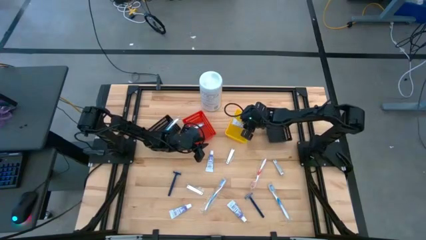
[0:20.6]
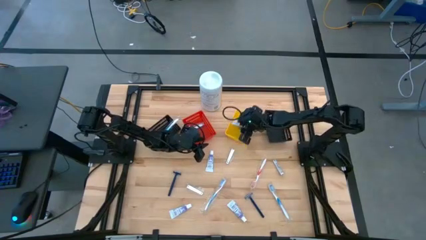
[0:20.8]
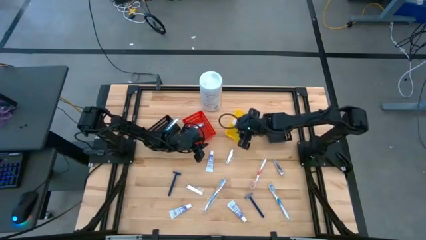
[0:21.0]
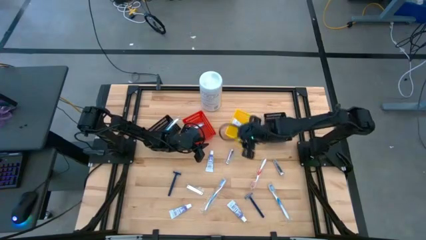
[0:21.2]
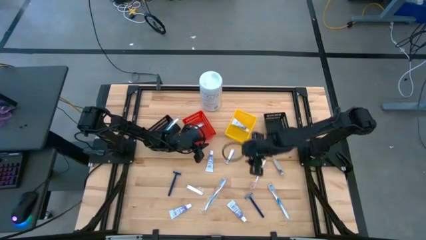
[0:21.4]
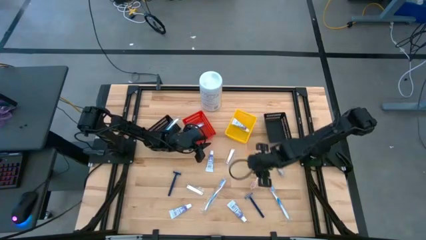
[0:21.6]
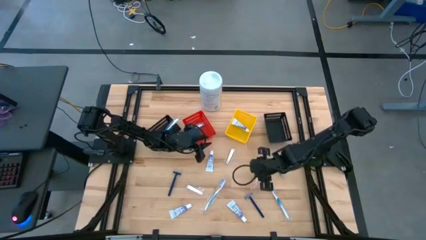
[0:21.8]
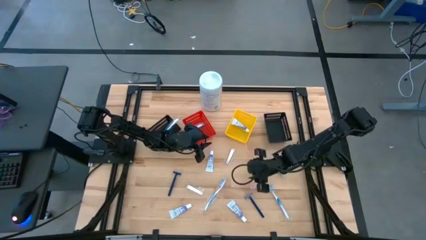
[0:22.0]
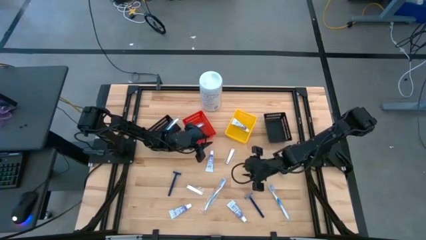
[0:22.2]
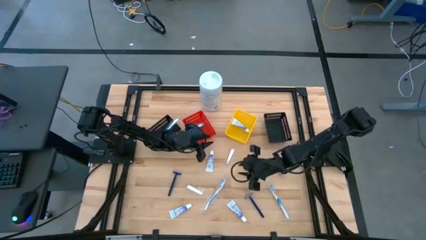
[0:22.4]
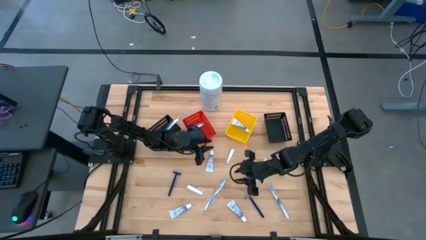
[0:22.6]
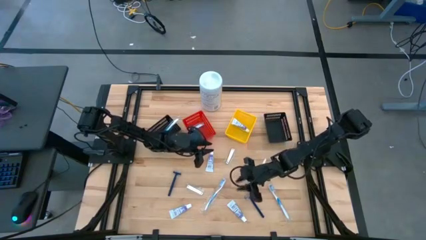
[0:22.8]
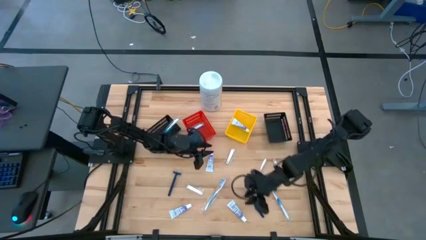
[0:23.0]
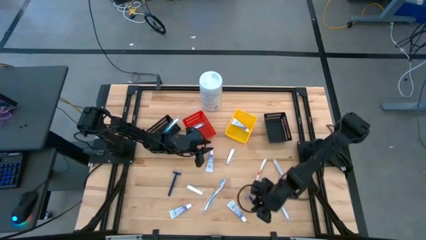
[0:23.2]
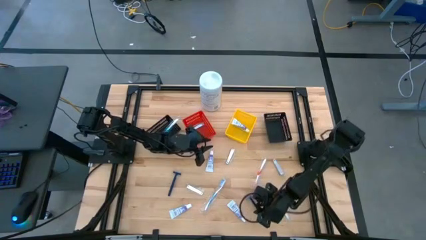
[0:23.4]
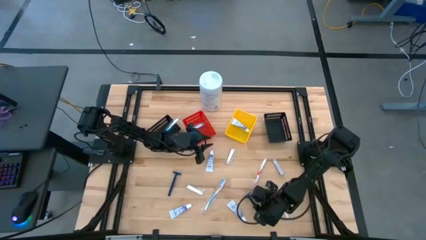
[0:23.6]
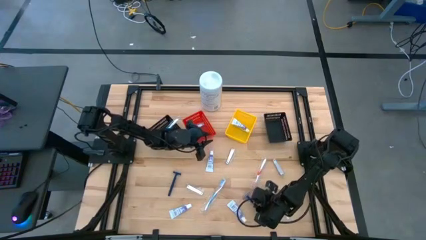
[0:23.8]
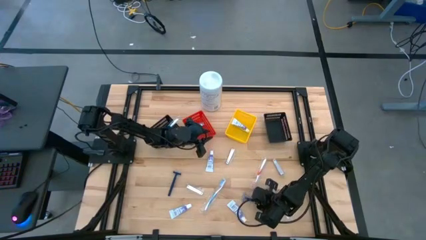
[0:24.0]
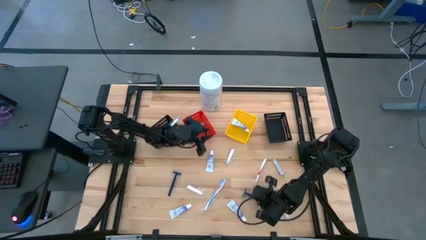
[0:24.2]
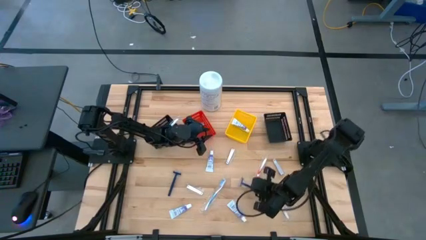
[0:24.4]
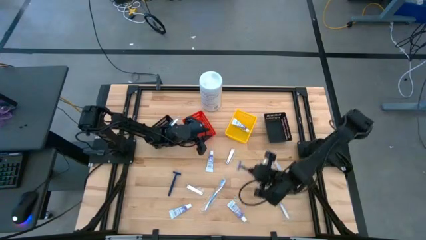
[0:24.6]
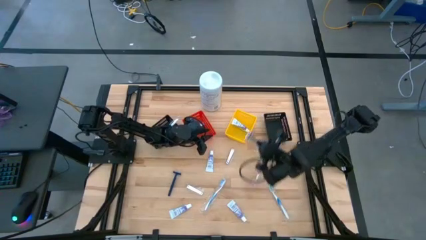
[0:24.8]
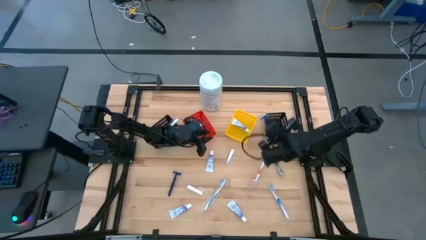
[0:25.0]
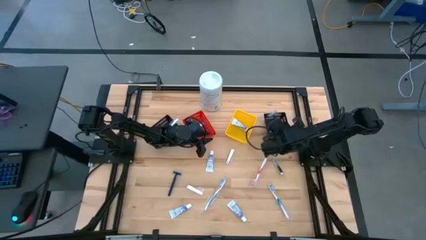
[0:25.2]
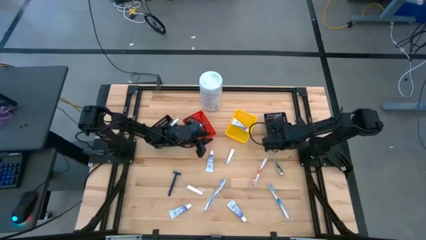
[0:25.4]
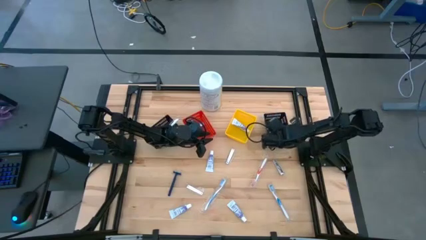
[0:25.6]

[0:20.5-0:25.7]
Task: Pick & Place Travel size toiletries
Put the right blue razor into the right black basket

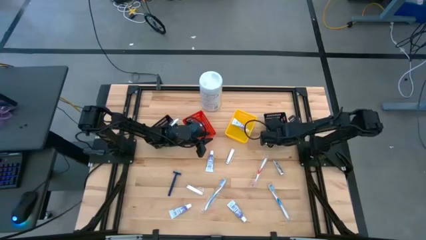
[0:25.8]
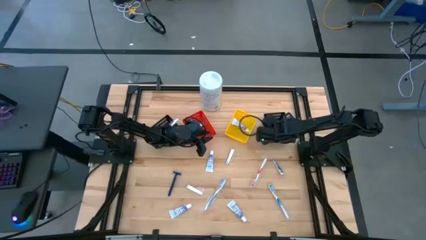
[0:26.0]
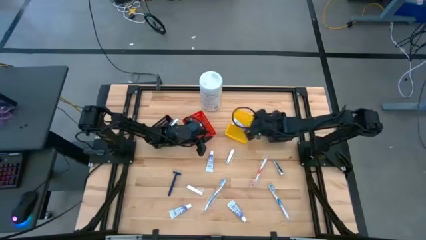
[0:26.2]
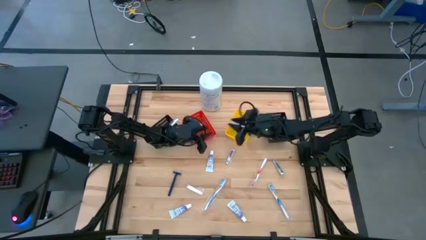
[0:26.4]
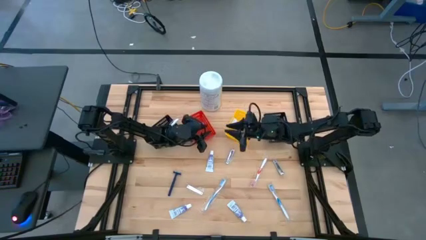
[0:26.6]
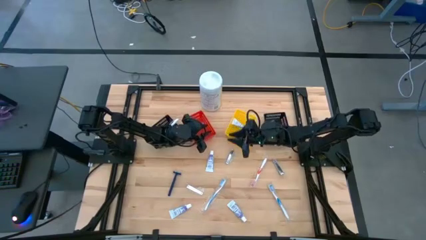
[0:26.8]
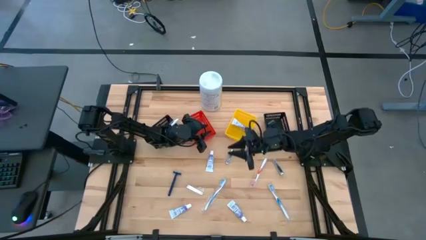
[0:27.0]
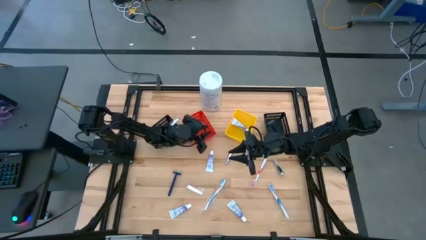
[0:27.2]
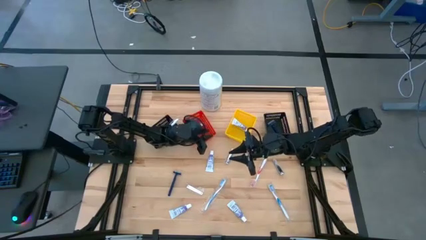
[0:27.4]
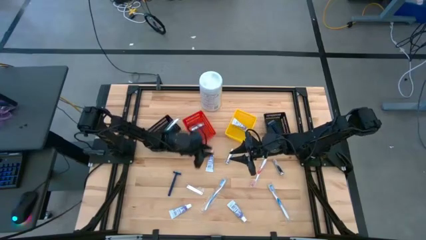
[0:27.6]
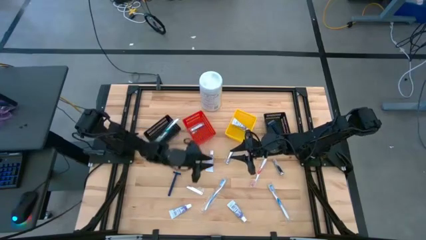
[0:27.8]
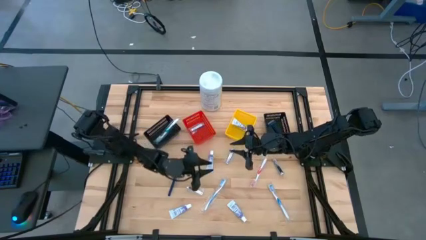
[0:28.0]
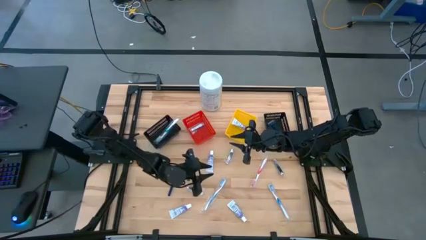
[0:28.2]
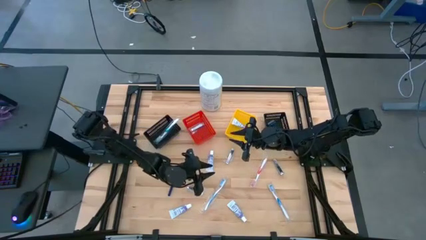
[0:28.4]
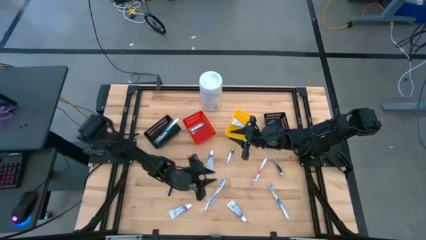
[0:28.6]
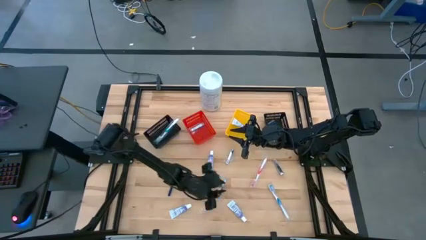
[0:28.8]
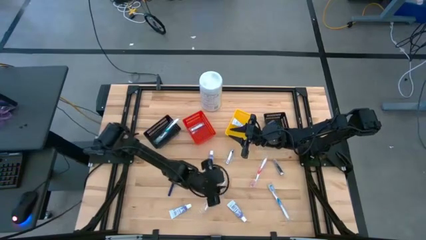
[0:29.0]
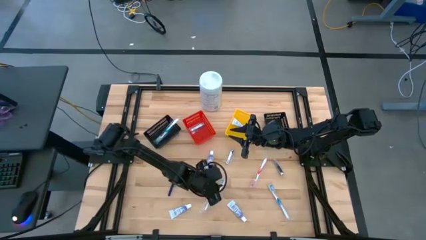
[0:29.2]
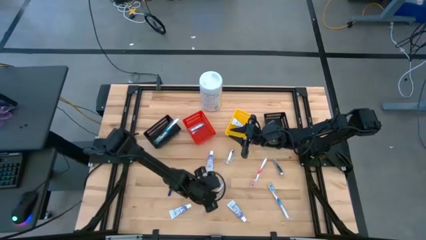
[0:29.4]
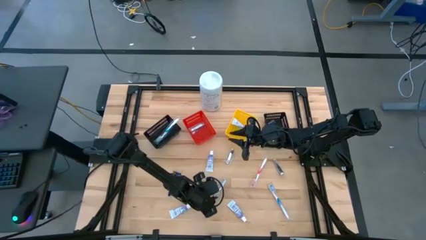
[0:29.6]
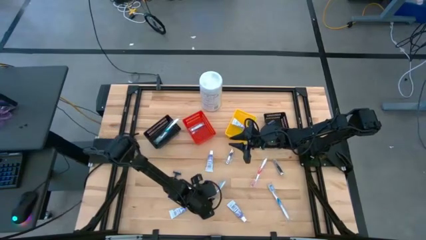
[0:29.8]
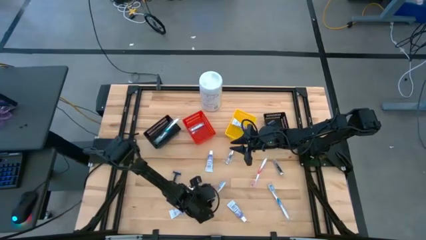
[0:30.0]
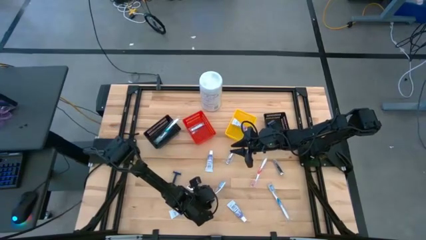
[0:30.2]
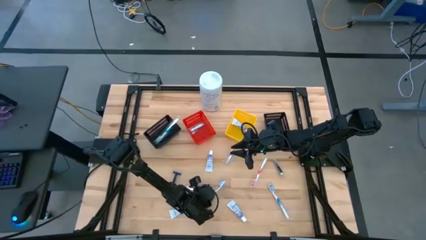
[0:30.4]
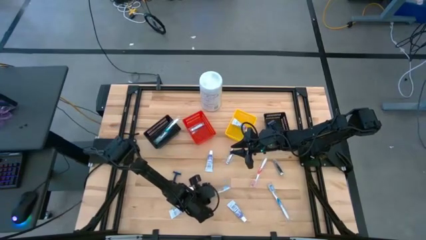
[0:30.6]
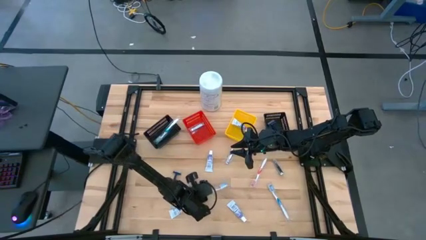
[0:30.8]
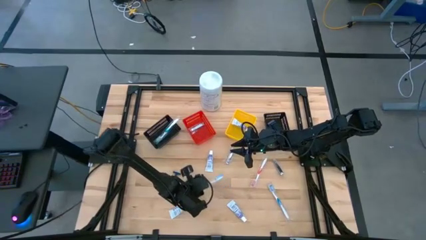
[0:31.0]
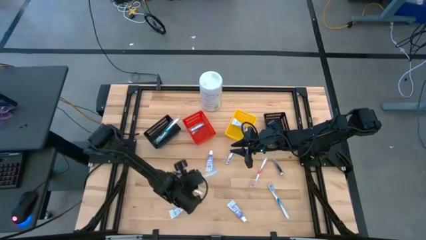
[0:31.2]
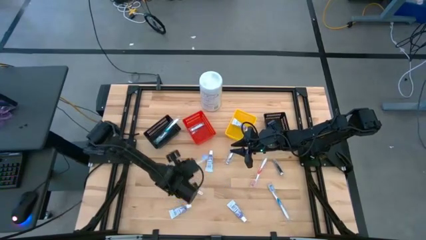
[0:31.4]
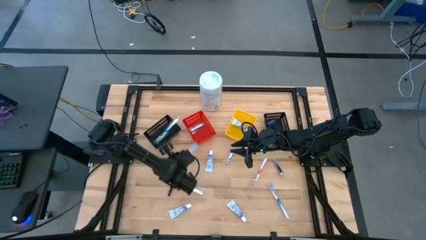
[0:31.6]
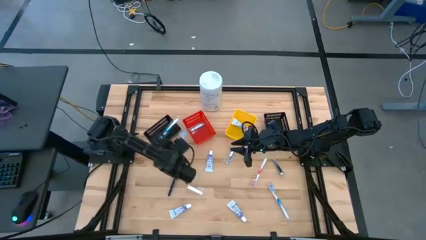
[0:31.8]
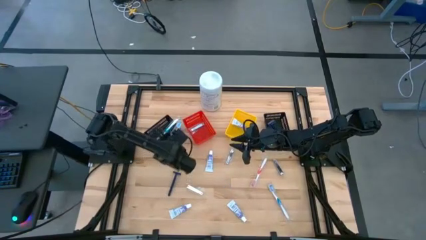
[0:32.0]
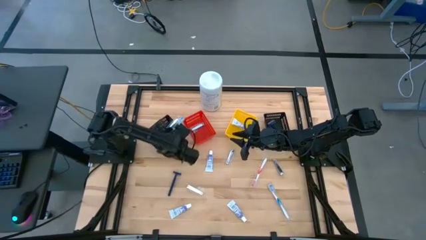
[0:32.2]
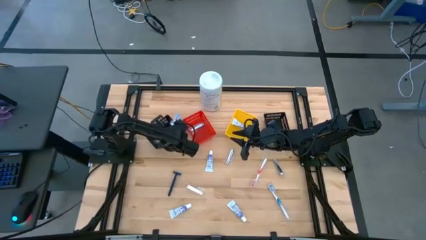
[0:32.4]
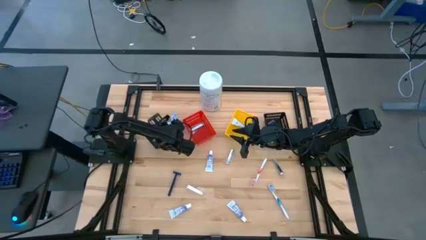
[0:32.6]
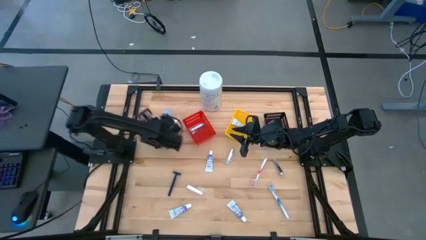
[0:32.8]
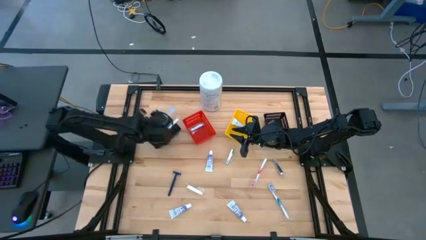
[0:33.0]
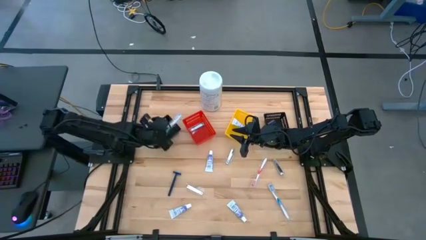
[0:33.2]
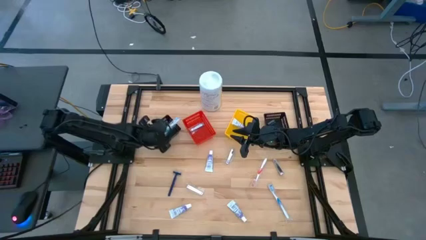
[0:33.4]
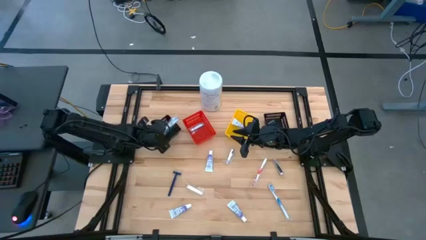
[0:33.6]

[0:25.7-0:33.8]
Put the left blue toothbrush into the left black basket

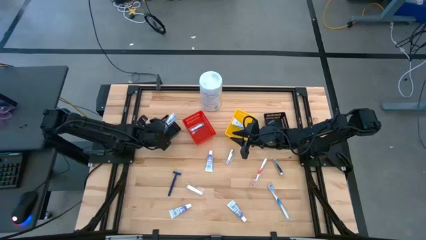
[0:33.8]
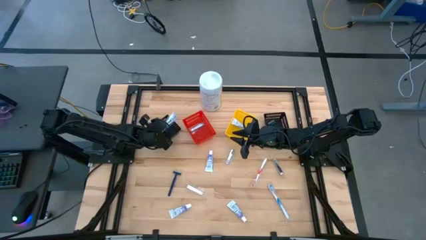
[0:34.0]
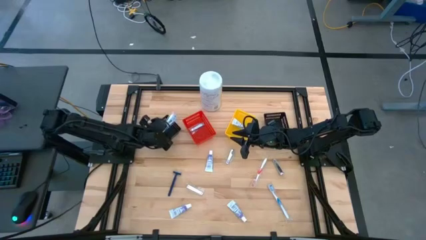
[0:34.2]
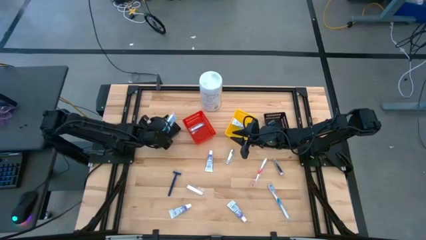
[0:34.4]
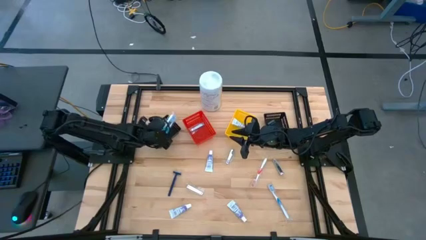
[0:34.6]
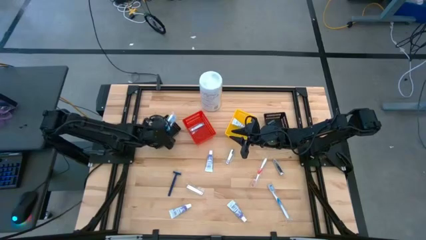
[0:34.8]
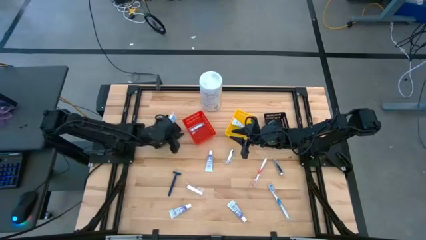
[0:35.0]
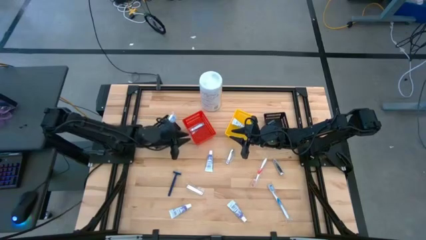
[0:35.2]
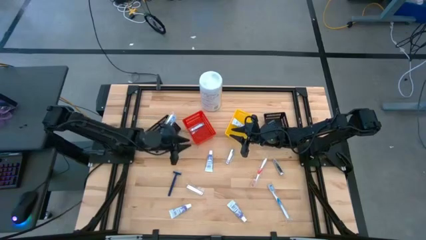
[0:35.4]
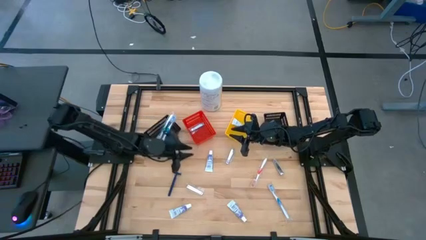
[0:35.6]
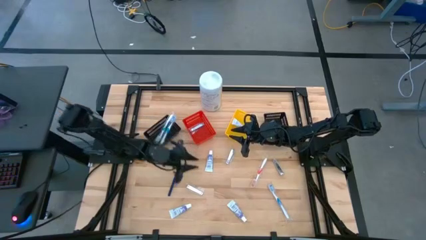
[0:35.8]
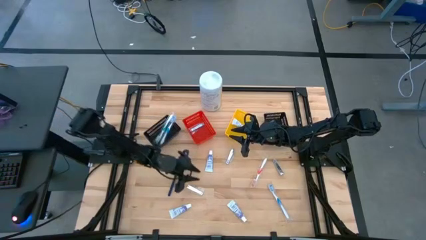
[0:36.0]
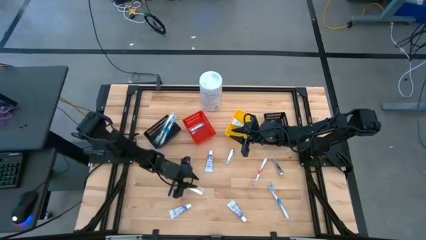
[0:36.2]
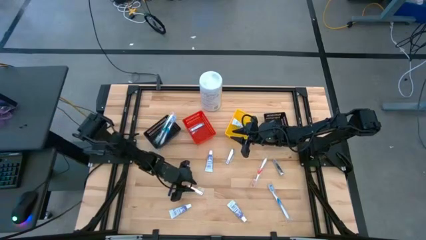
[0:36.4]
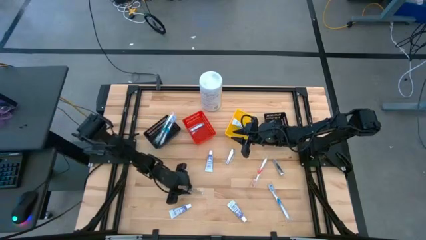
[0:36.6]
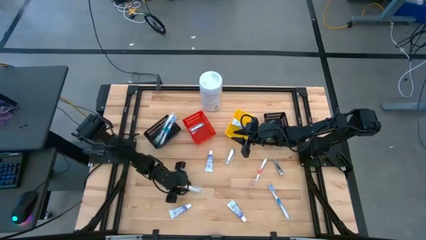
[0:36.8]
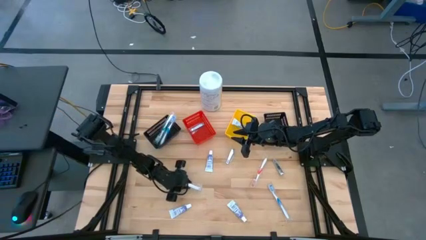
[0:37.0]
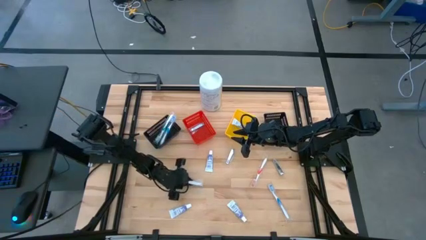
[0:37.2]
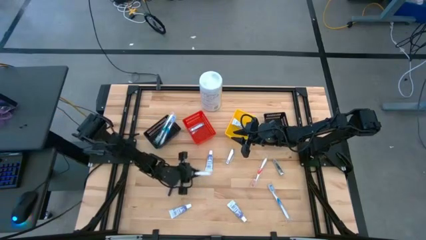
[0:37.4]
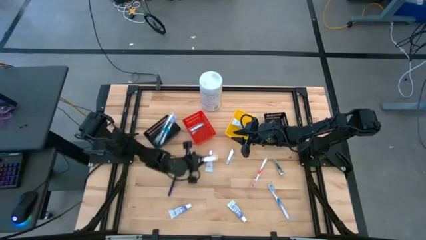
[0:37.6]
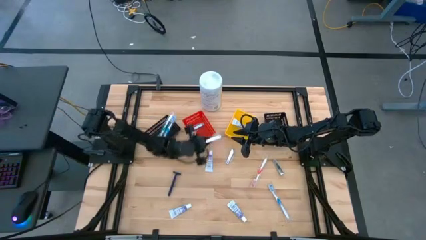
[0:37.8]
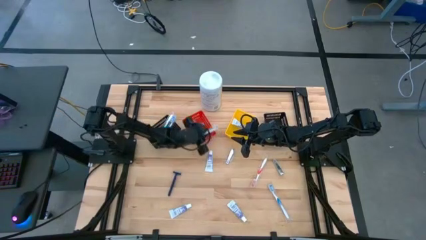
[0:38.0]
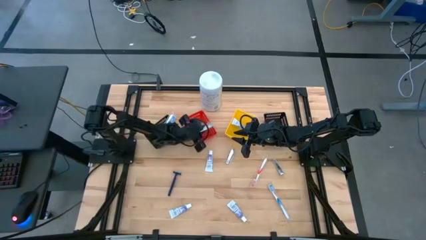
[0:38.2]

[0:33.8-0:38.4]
Put the bottom left silver nail clipper into the red basket
